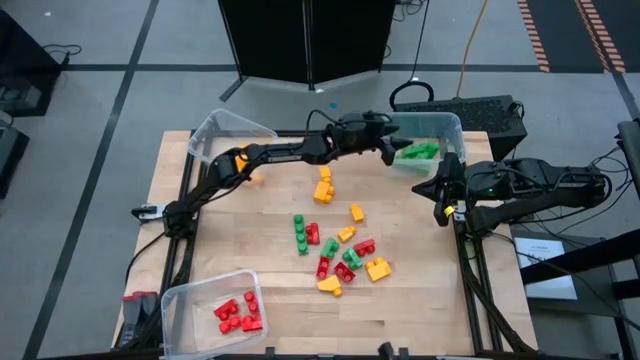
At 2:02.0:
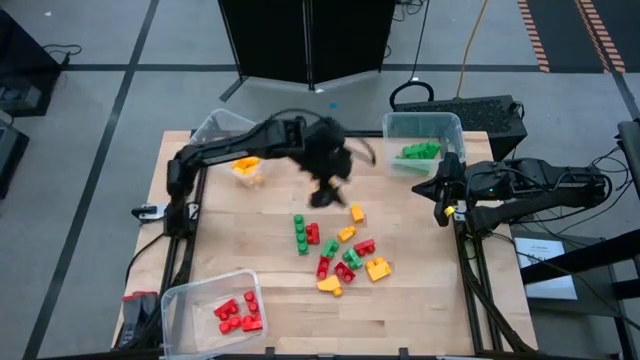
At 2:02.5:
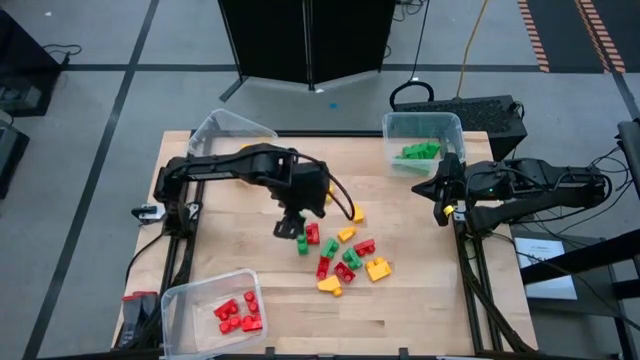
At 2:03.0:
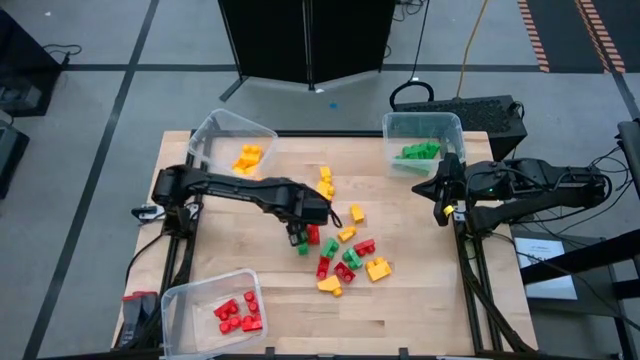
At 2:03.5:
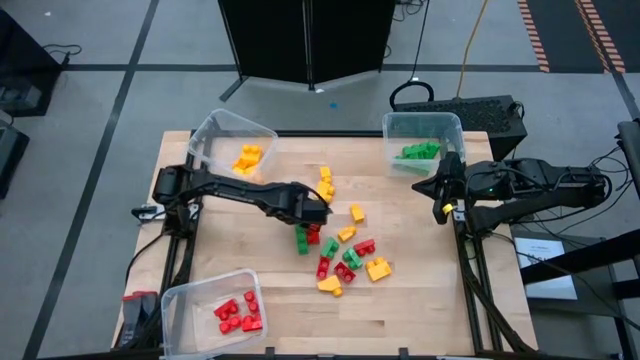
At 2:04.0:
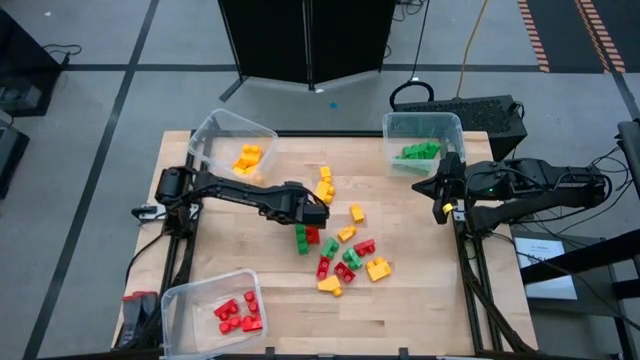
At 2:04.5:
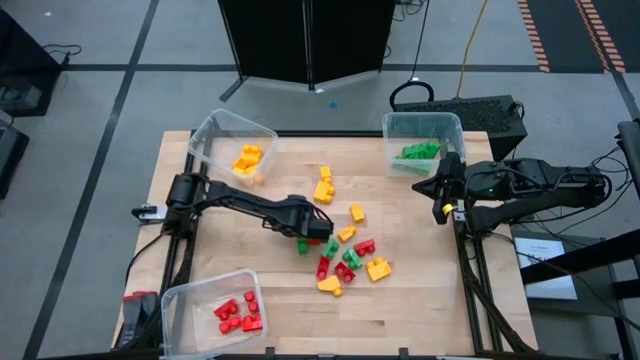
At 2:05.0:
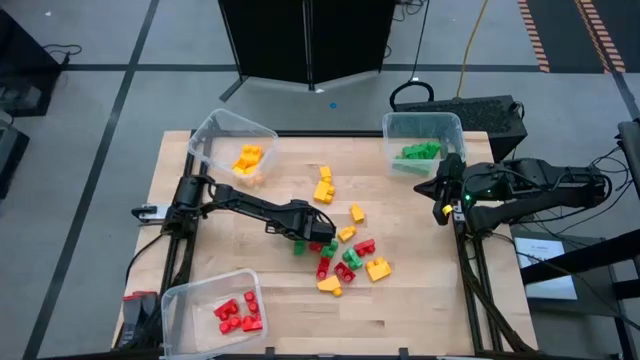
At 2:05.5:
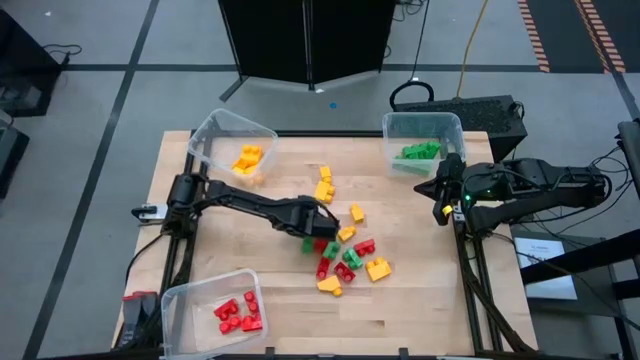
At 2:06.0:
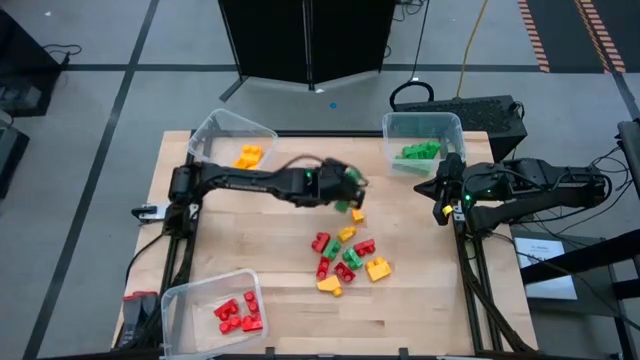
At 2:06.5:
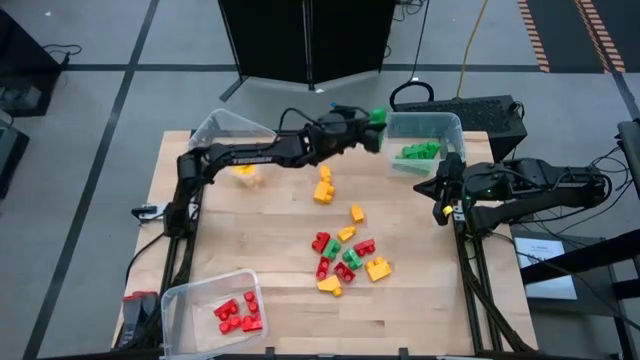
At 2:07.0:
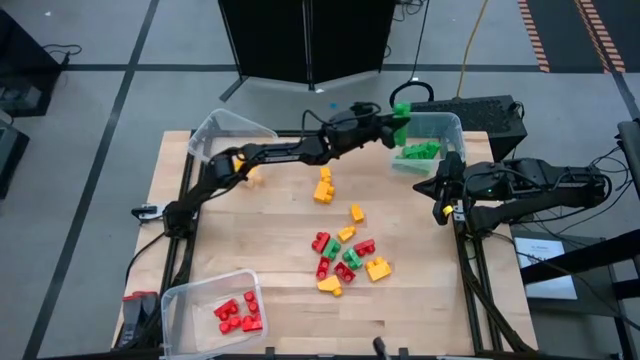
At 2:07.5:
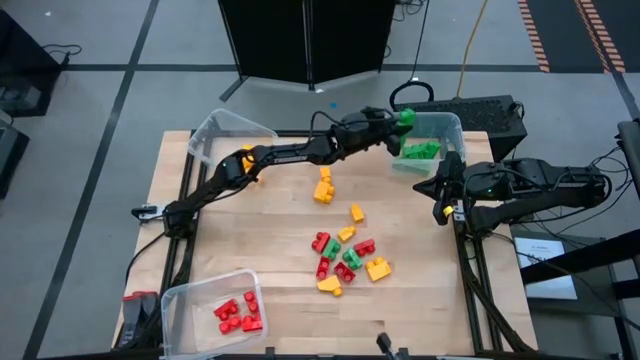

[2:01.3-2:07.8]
Task: Sort blocks
Put the green game piece into the top right transparent bin

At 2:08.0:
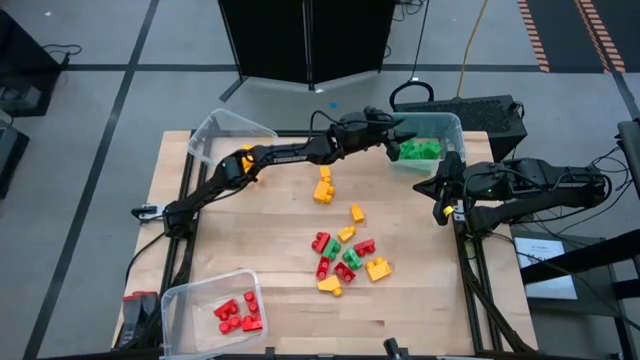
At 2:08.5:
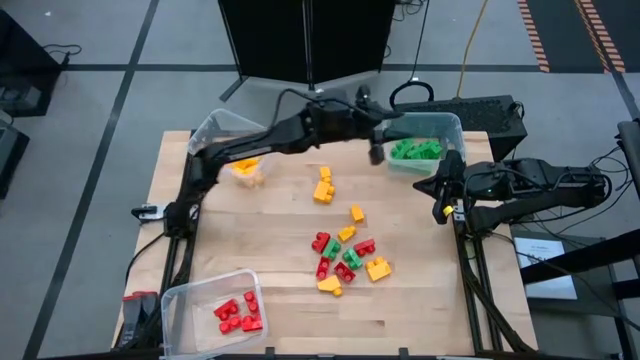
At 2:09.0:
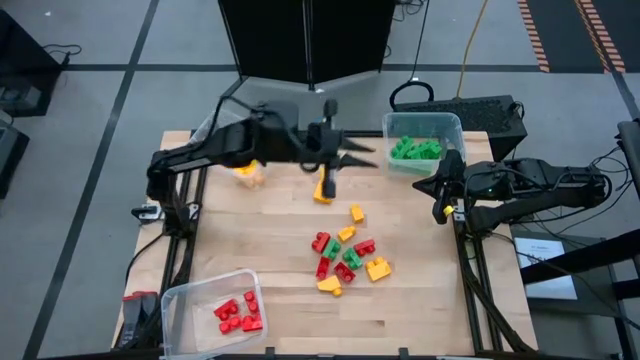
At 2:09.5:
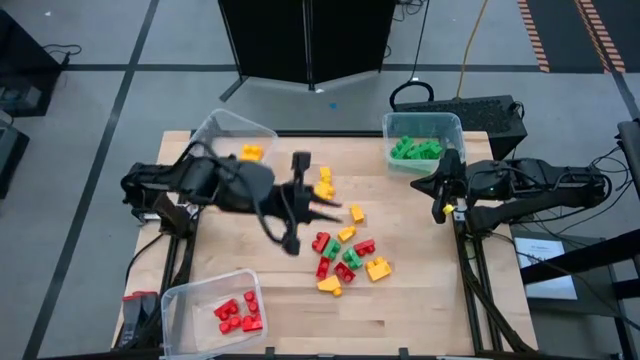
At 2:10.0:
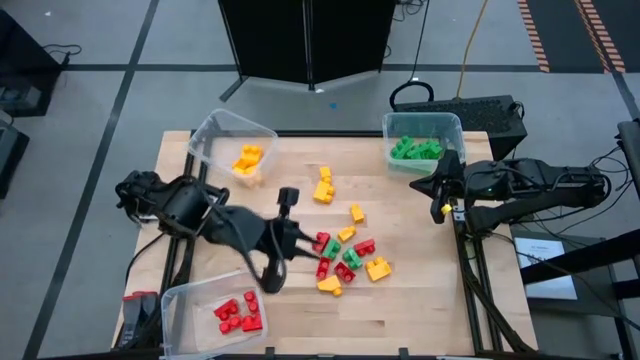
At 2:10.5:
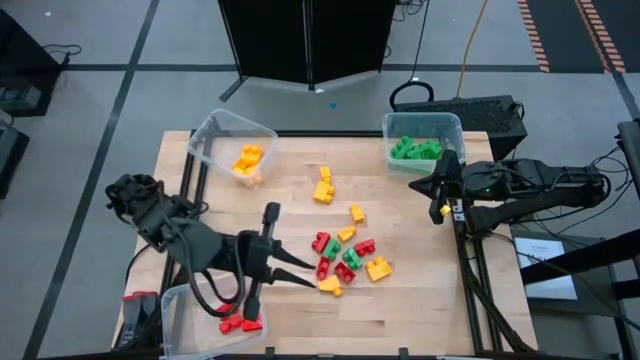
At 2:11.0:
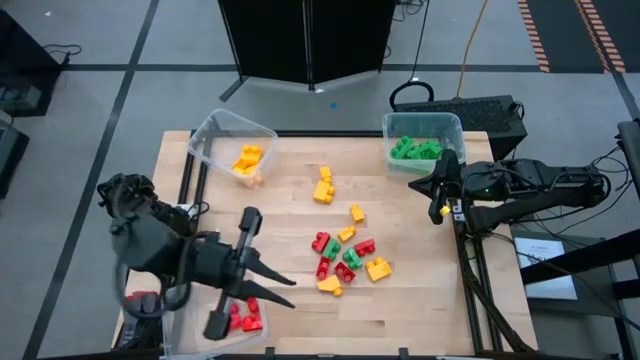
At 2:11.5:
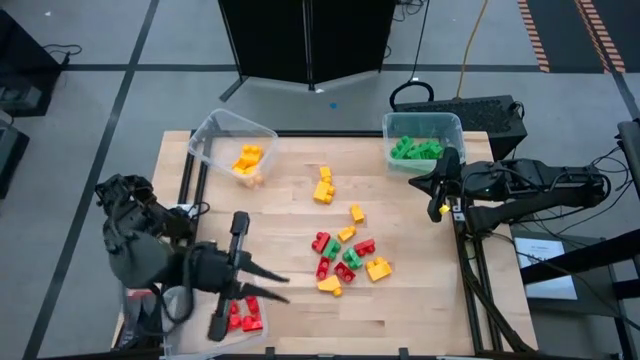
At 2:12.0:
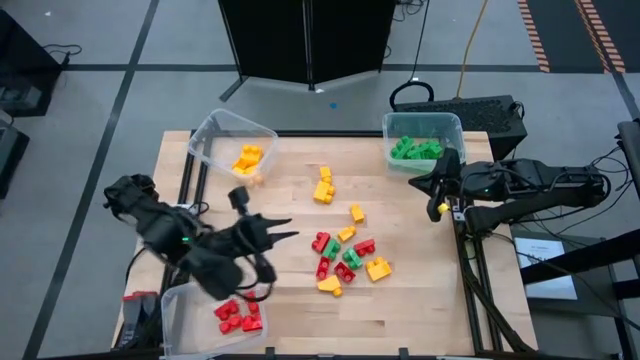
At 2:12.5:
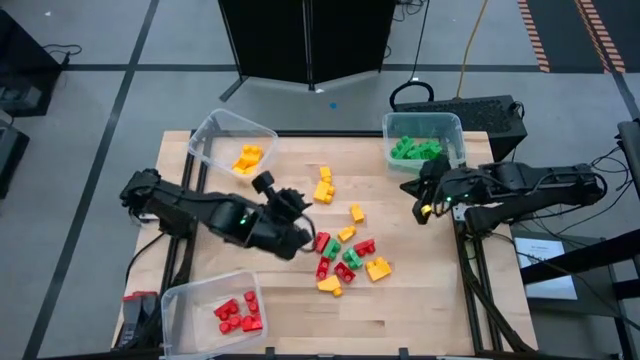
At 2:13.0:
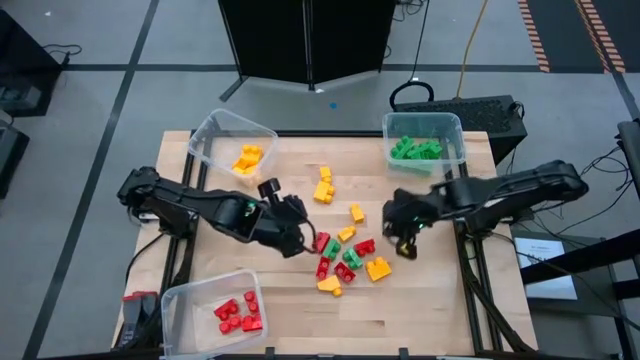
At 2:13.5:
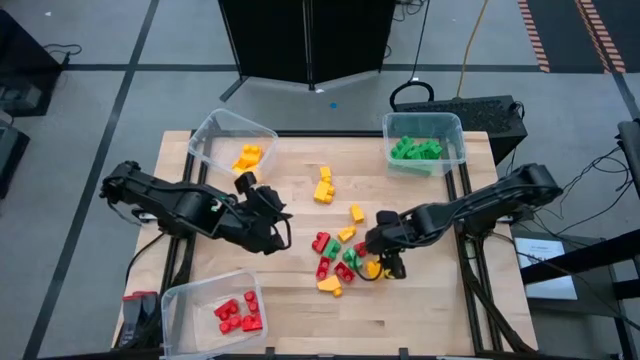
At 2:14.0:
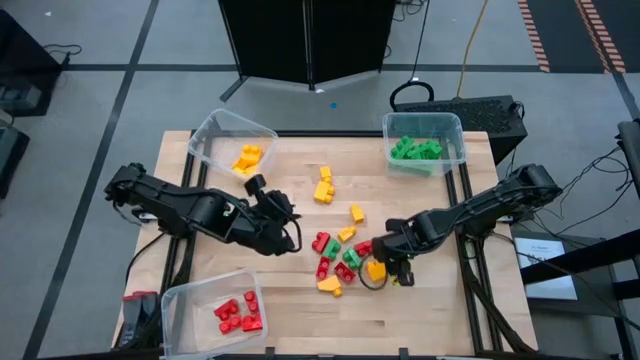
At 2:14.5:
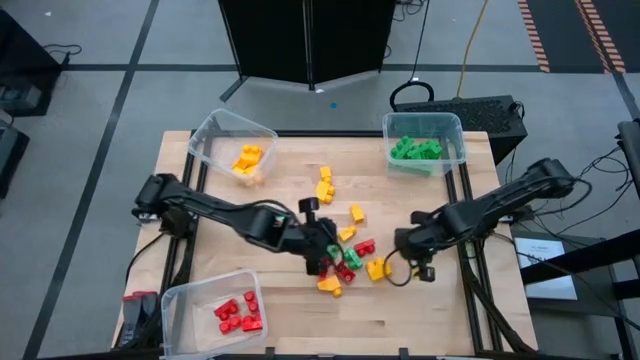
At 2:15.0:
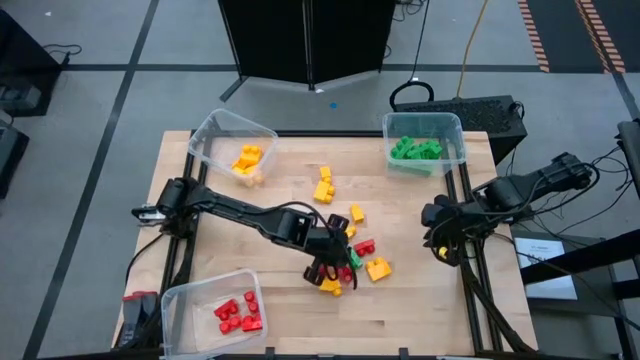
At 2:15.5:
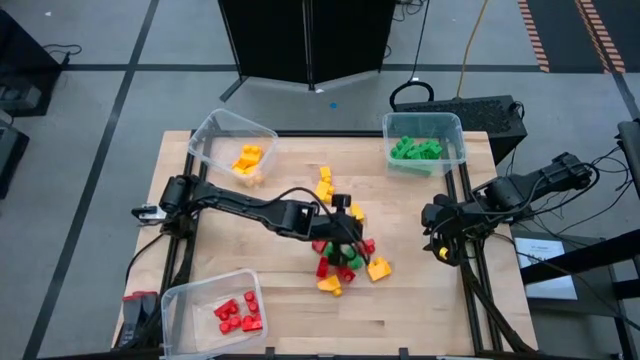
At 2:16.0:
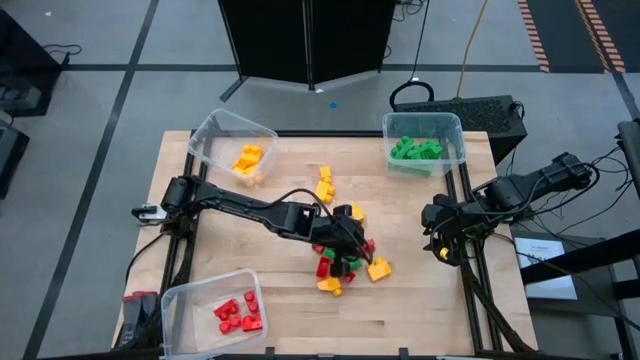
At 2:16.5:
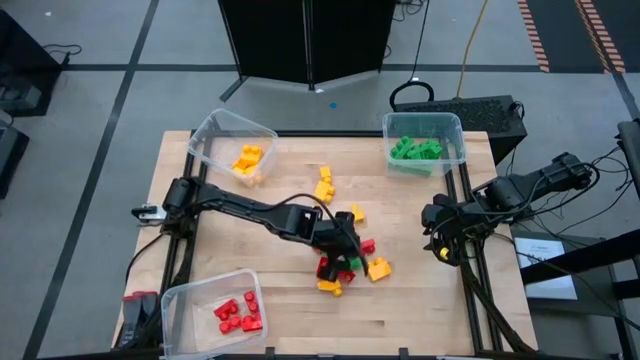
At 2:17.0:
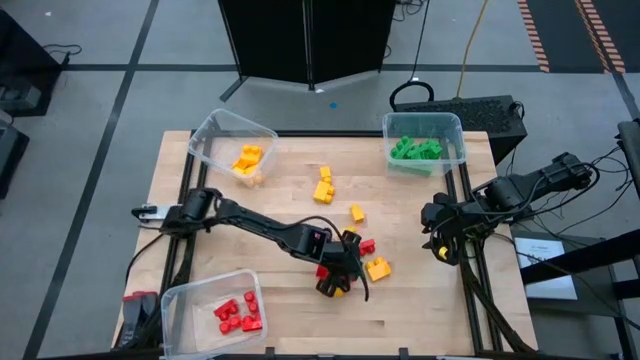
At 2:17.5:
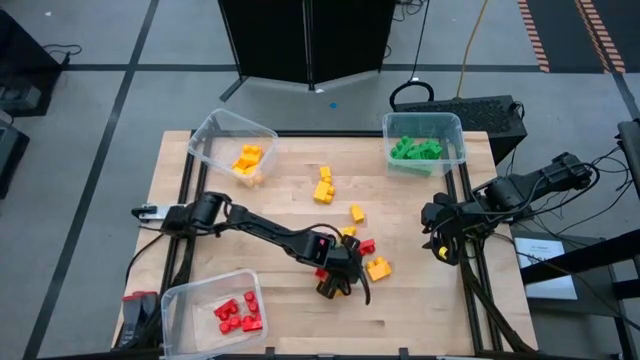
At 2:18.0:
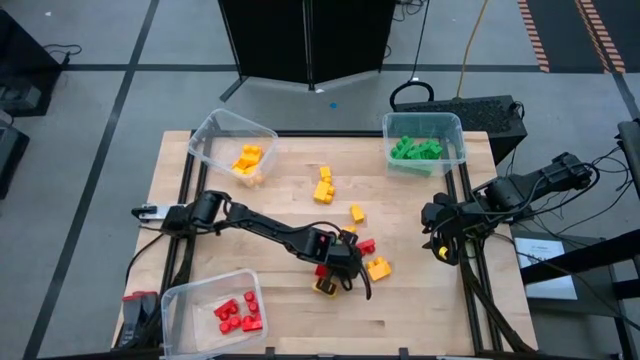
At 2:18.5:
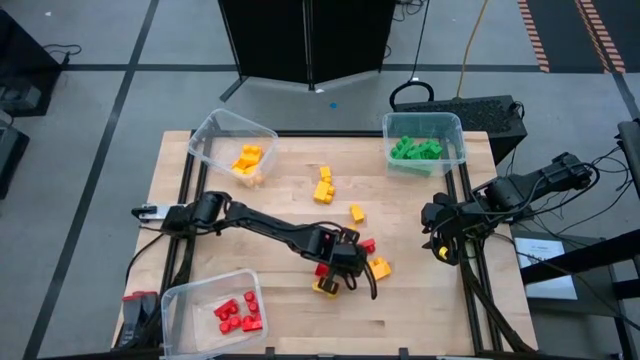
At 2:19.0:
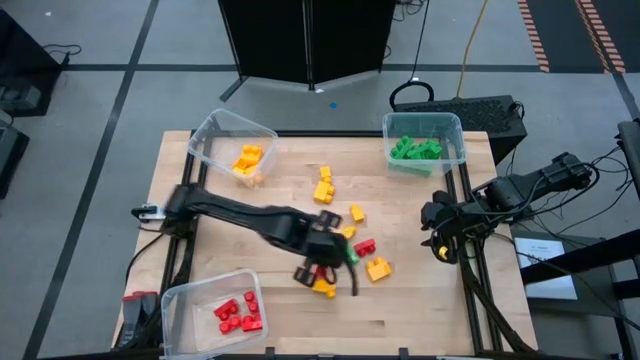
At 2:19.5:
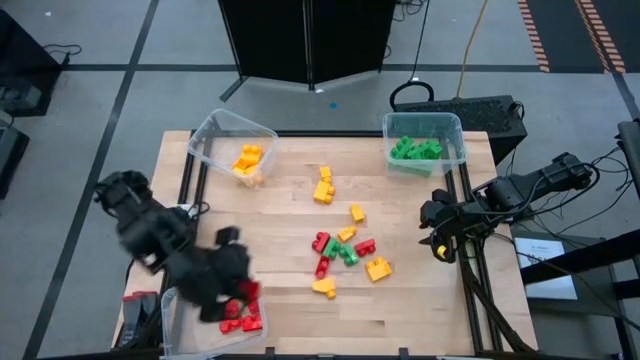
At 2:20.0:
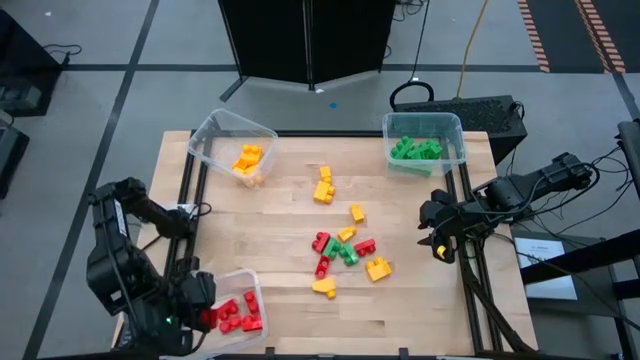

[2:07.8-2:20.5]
Put the red game piece into the bottom transparent bin

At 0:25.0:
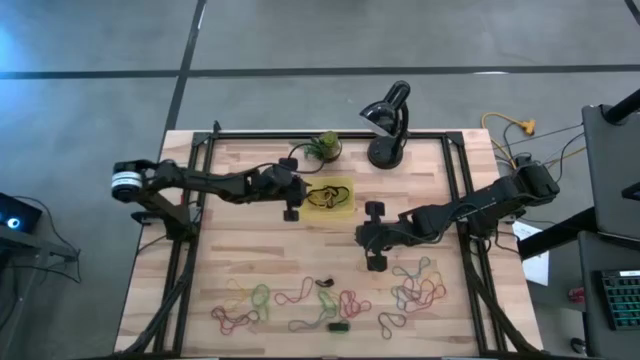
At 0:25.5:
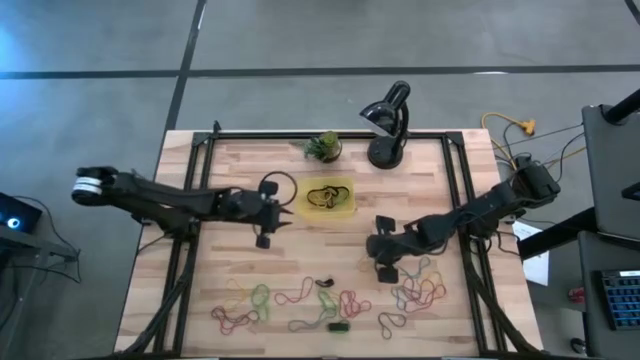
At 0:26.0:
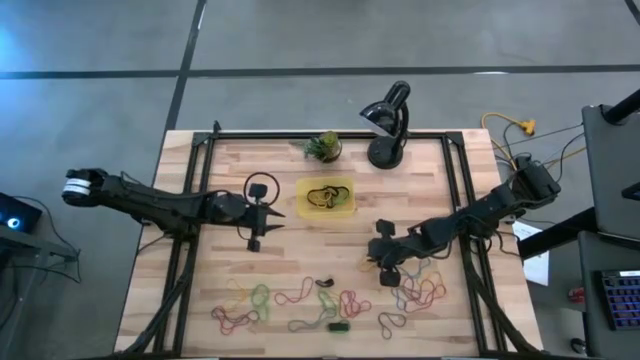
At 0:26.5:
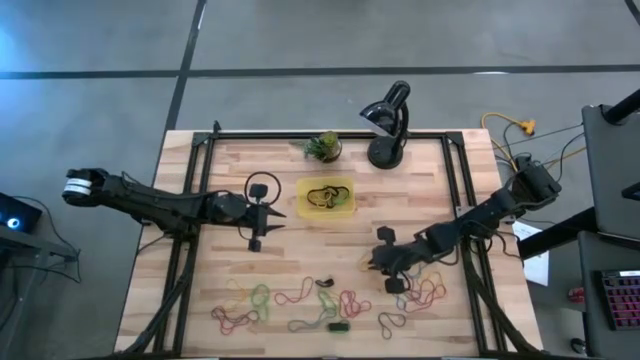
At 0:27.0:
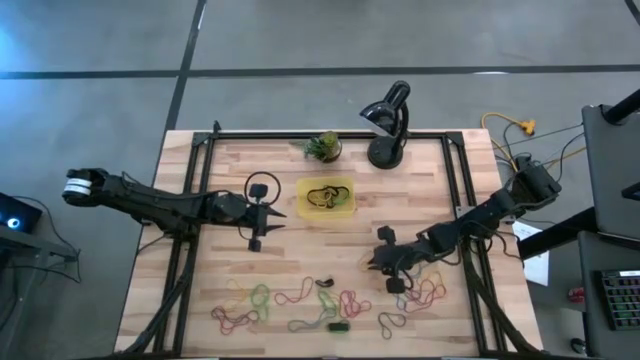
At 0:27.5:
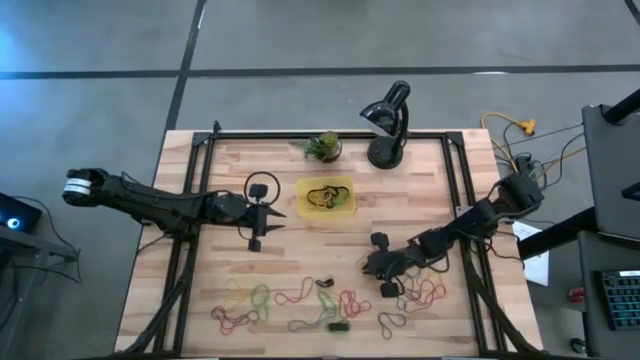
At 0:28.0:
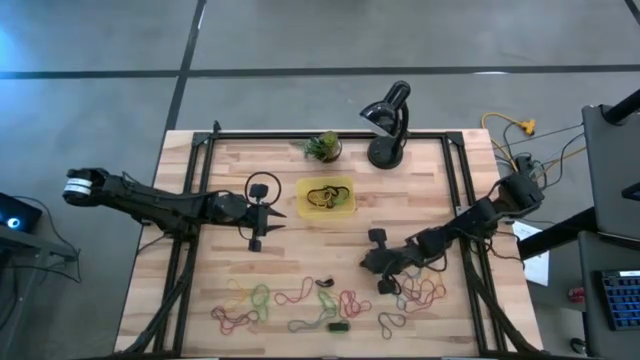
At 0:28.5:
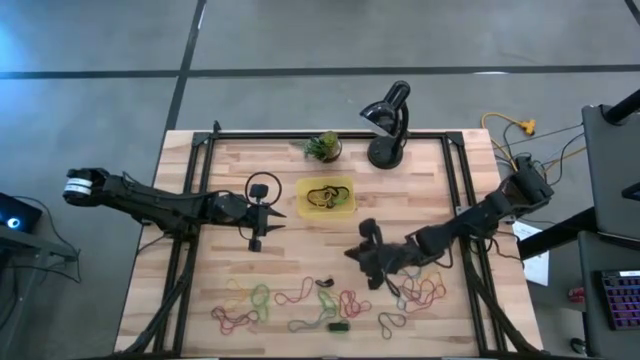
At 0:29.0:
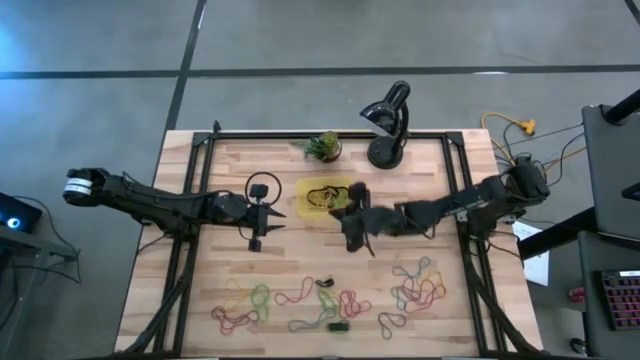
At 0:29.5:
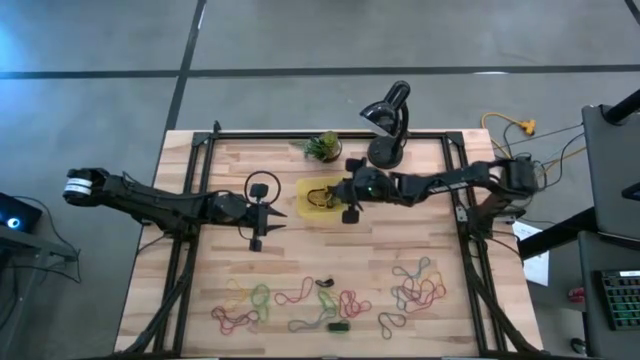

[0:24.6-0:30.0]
Task: Pick and place rubber bands into bin
Put the yellow rubber band in the yellow bin
